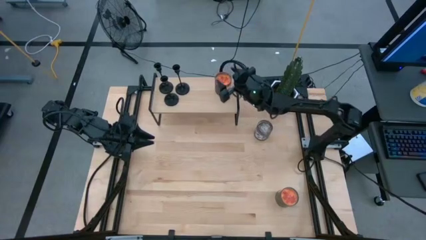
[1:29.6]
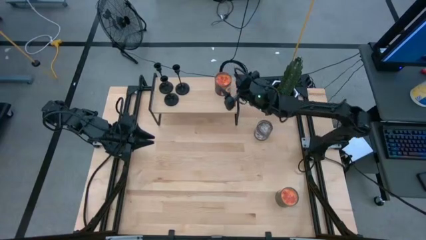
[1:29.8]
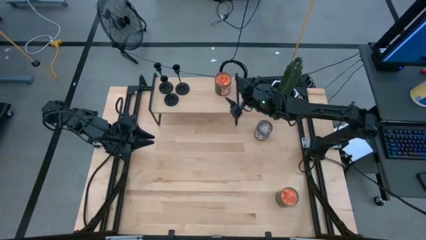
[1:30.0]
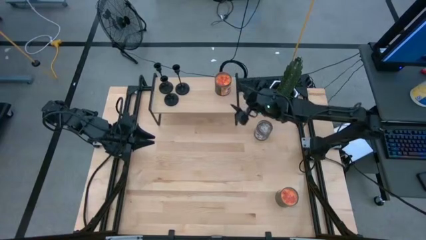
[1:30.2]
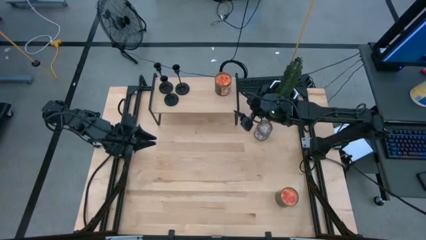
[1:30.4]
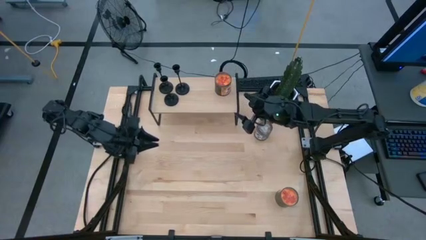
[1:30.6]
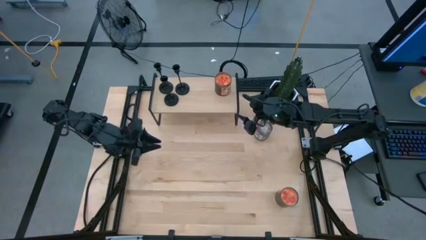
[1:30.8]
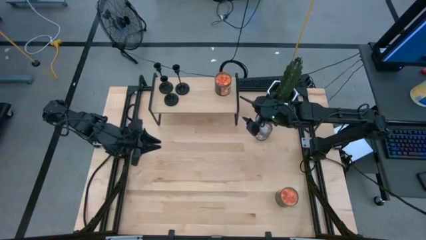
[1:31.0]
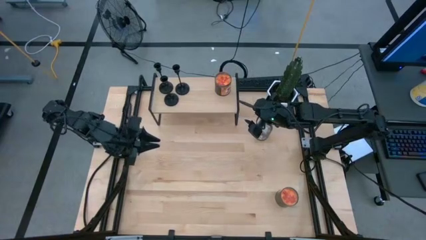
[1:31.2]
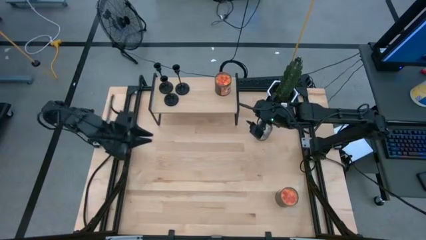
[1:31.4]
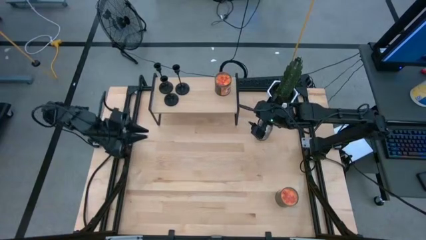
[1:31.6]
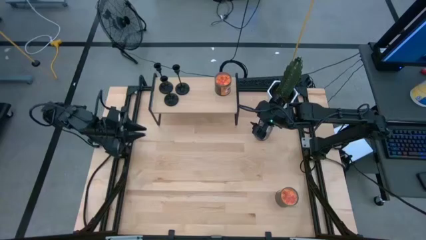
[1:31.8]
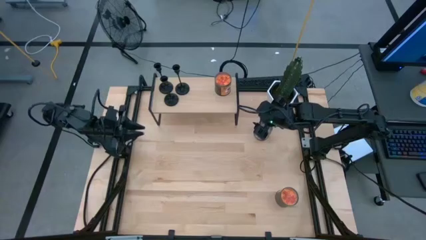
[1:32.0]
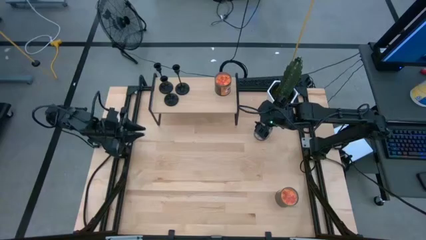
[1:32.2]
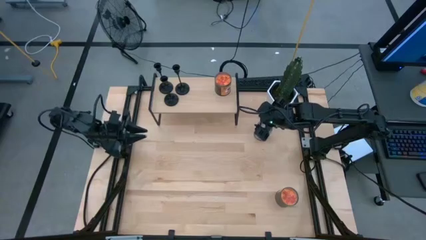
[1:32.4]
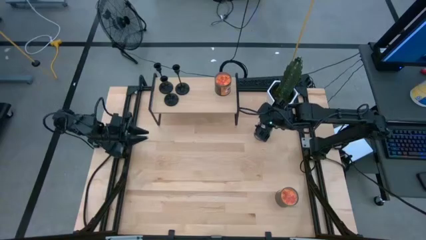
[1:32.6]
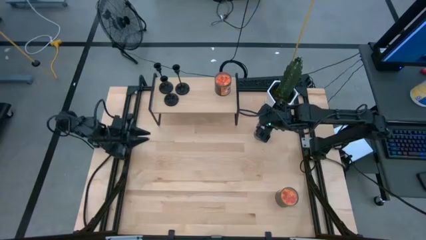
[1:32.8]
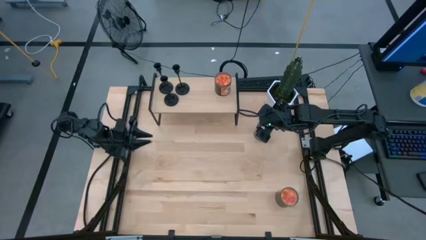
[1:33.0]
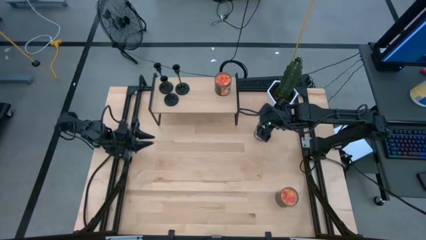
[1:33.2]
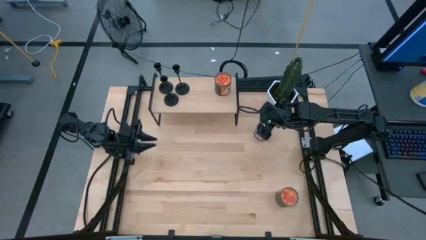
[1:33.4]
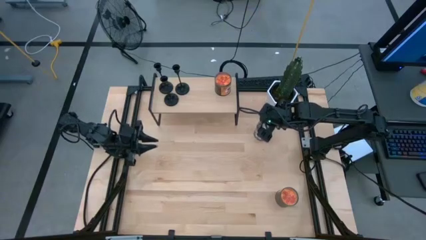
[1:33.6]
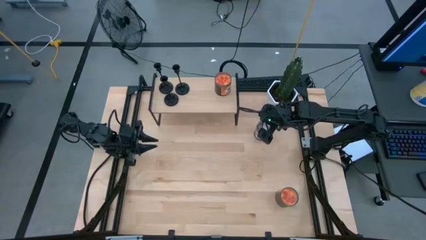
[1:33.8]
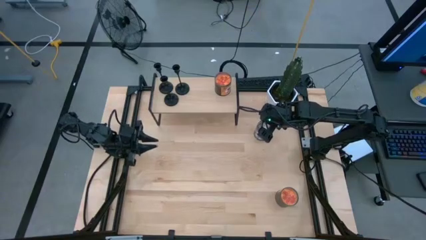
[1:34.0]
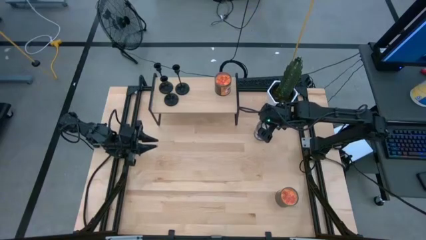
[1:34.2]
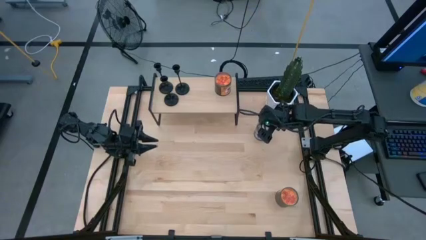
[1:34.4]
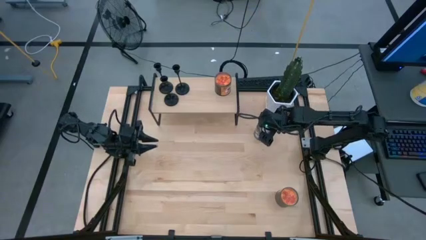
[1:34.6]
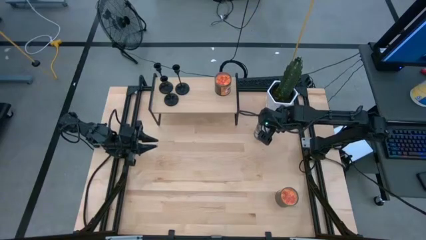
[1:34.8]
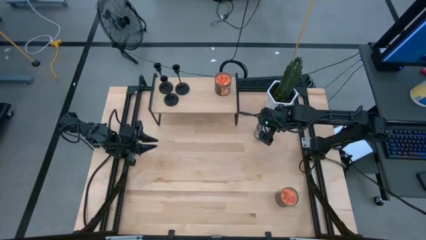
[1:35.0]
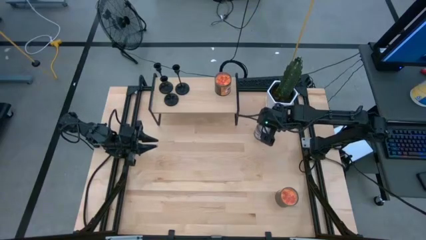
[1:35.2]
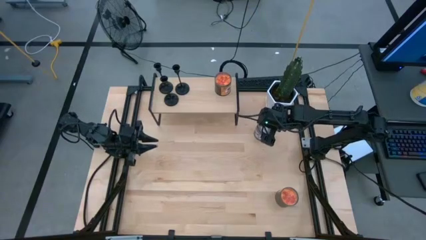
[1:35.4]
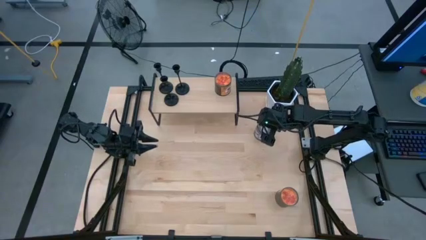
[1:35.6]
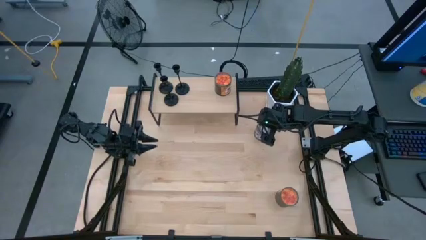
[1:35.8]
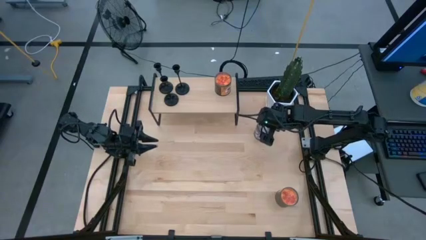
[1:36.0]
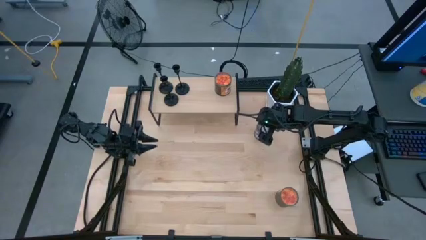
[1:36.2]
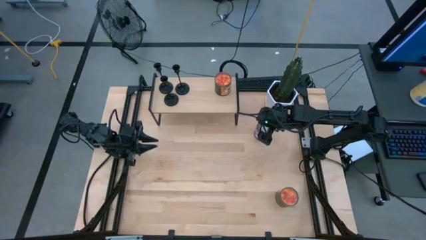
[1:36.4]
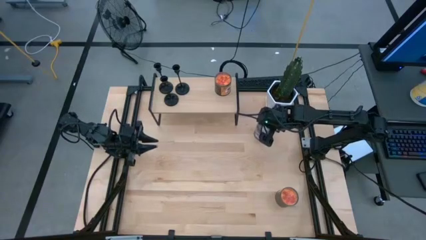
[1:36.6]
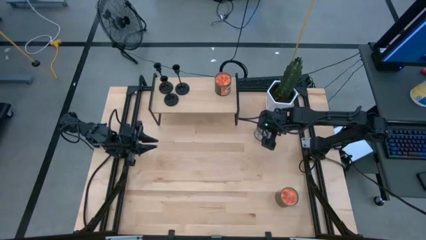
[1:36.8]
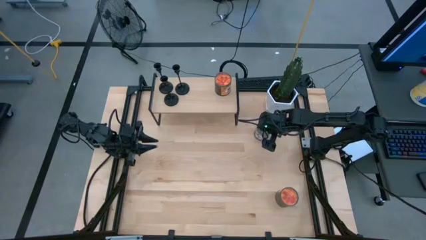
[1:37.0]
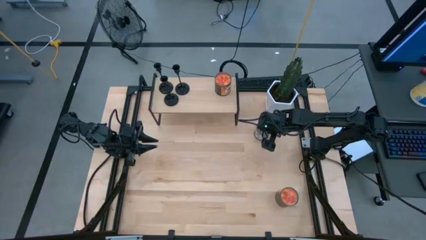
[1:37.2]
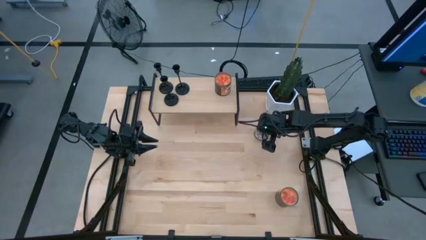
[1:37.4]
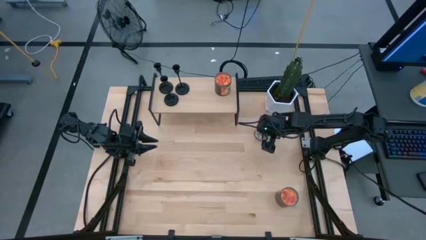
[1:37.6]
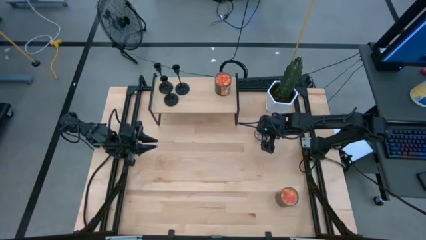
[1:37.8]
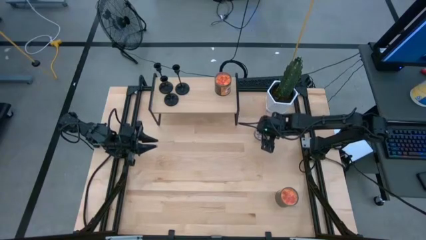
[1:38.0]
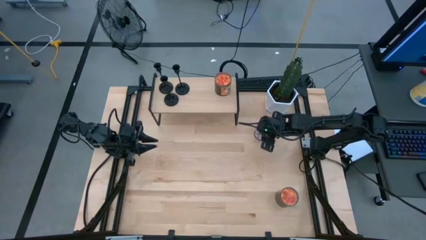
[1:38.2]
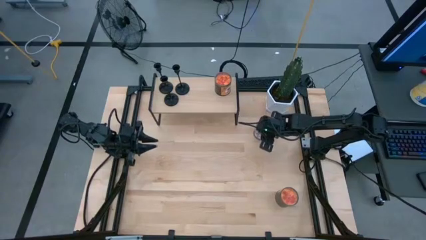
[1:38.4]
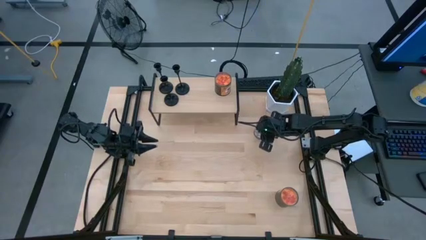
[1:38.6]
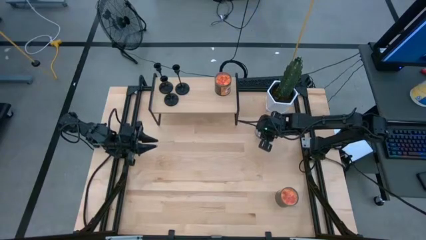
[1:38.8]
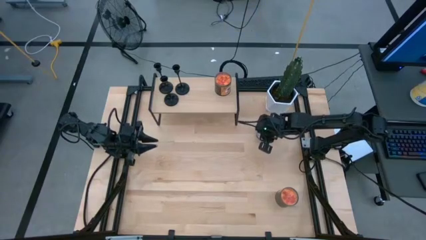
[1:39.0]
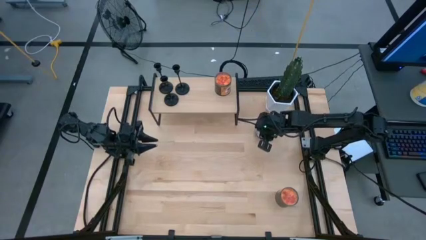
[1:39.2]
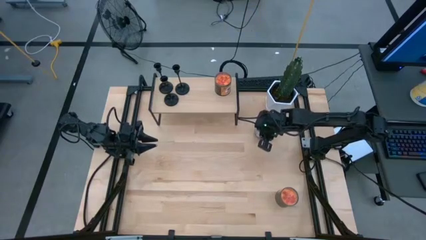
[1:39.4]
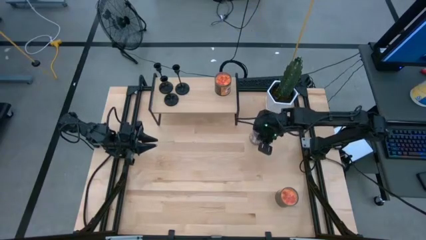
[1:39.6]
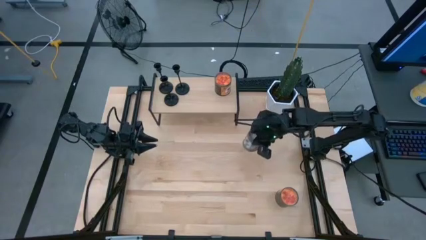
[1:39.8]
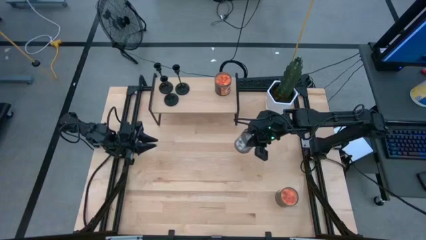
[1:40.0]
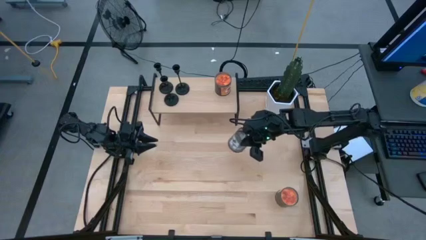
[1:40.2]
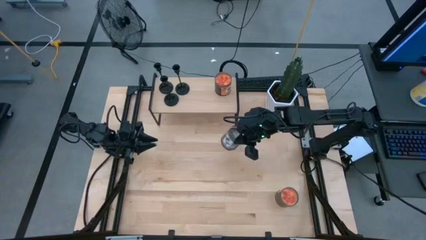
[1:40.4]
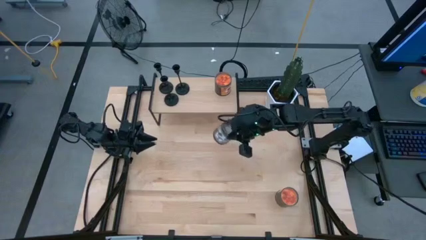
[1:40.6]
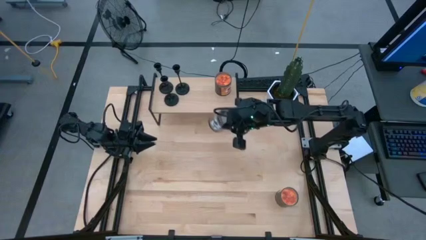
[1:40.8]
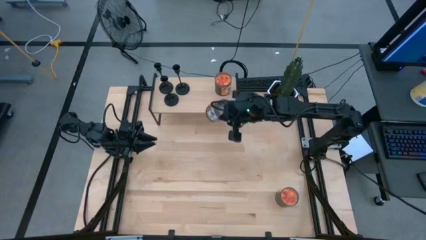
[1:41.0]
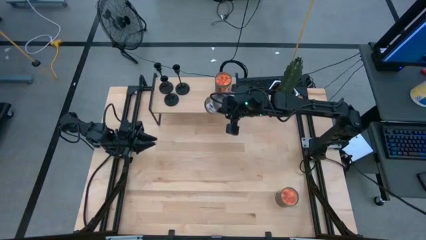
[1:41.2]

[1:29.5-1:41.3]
Task: Pick & Place candle stick holders
Put the brown scented candle on the shelf

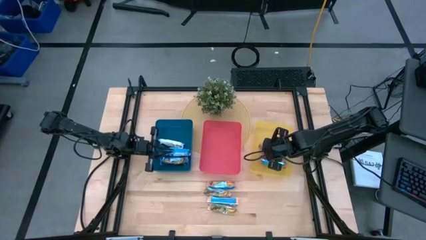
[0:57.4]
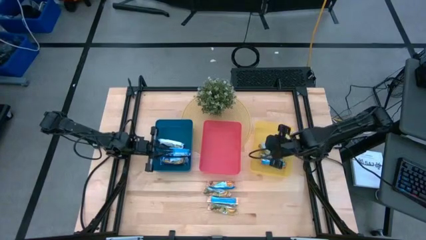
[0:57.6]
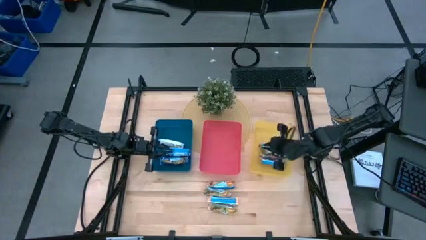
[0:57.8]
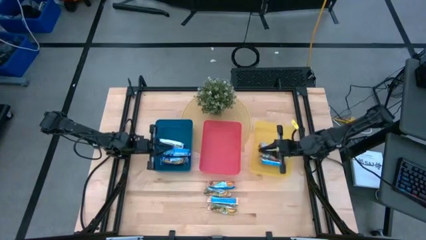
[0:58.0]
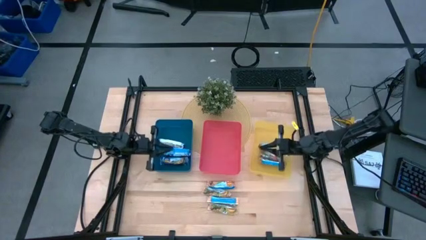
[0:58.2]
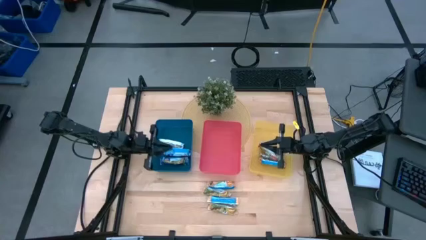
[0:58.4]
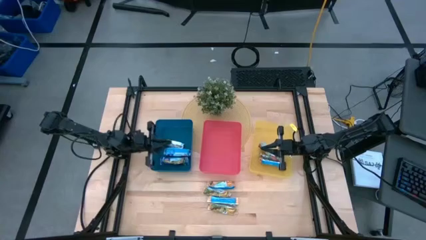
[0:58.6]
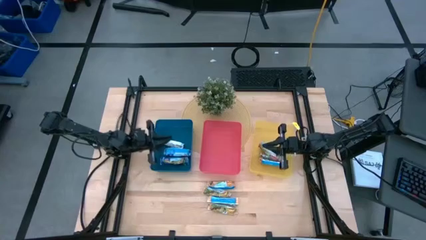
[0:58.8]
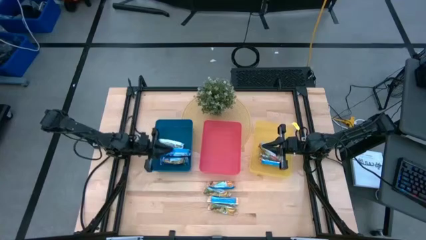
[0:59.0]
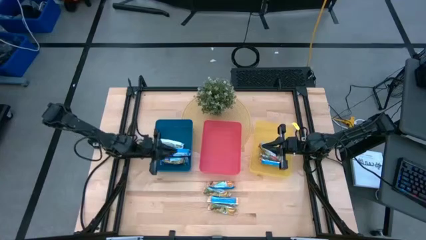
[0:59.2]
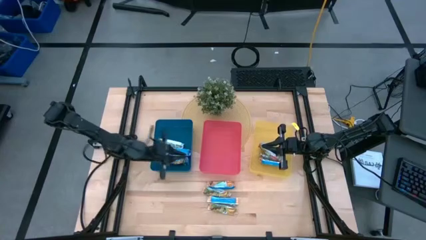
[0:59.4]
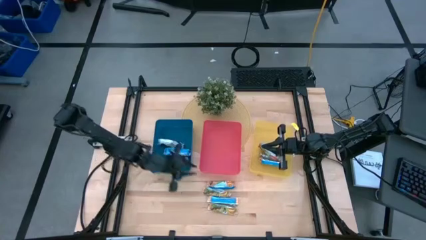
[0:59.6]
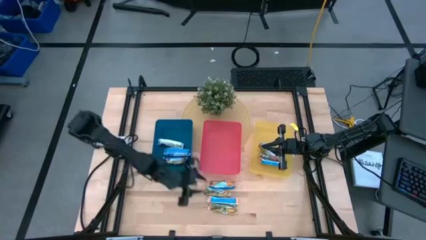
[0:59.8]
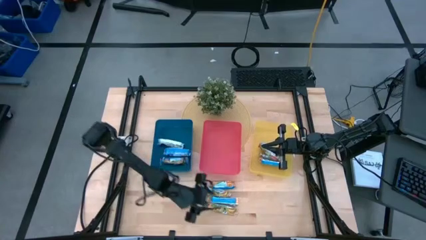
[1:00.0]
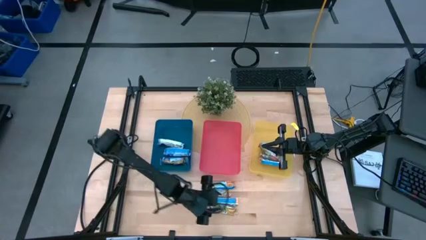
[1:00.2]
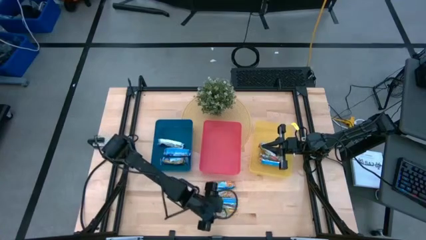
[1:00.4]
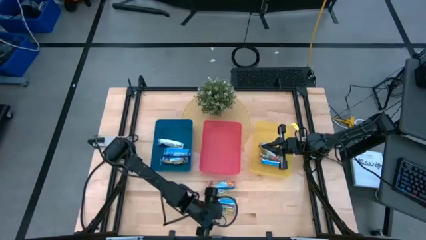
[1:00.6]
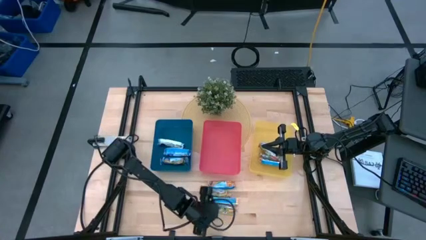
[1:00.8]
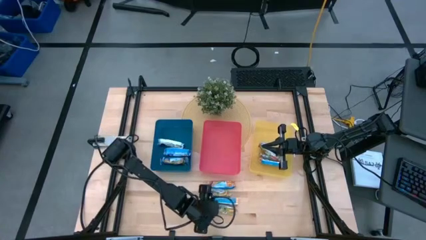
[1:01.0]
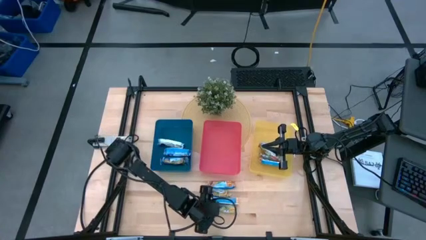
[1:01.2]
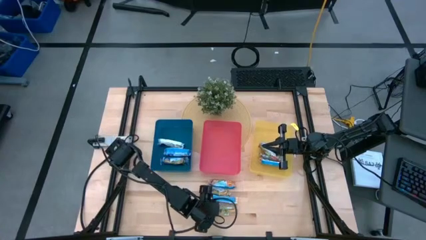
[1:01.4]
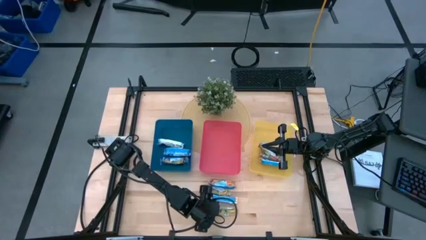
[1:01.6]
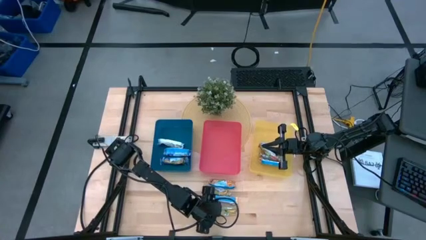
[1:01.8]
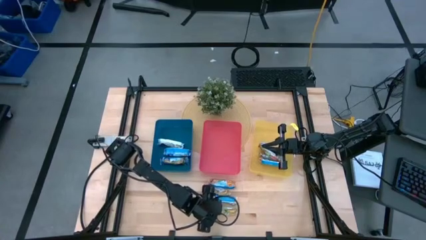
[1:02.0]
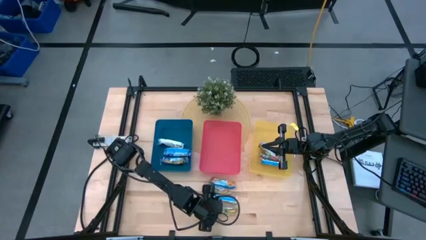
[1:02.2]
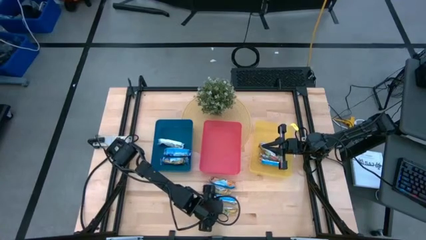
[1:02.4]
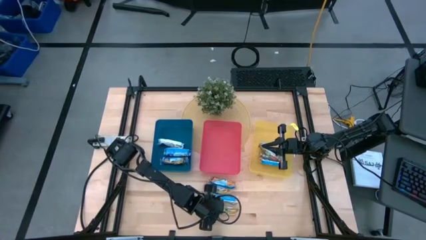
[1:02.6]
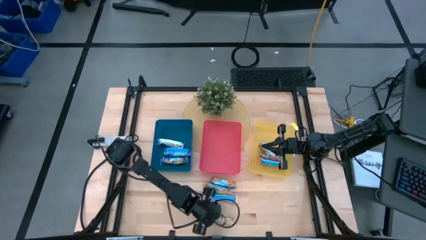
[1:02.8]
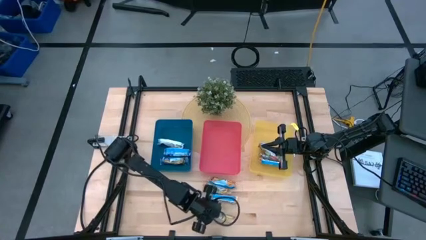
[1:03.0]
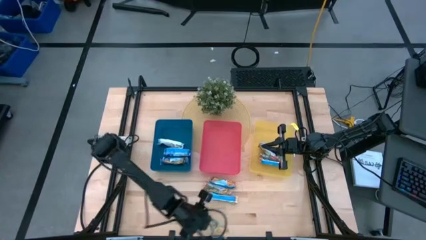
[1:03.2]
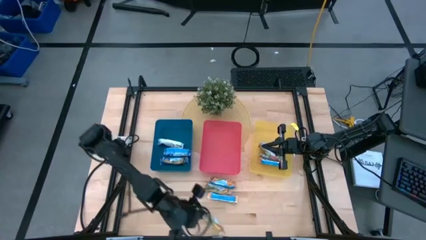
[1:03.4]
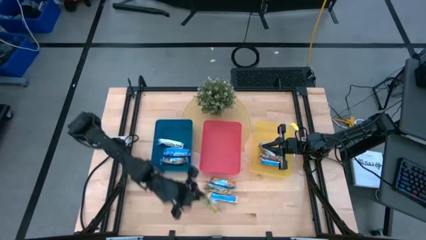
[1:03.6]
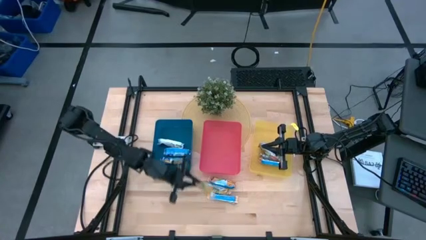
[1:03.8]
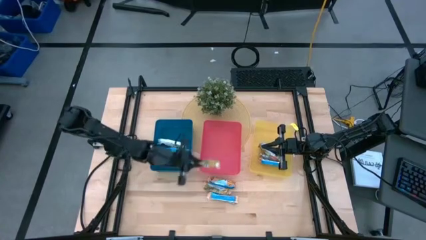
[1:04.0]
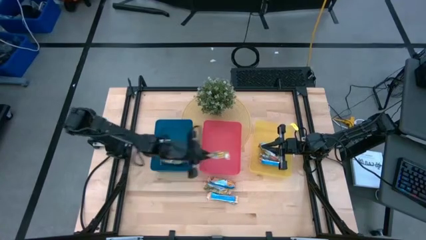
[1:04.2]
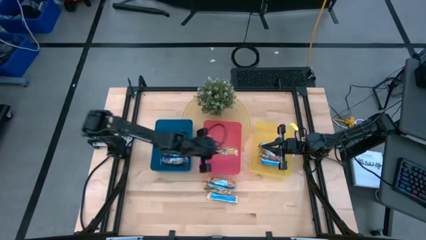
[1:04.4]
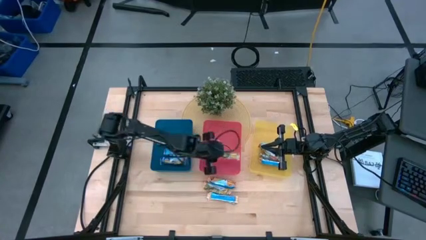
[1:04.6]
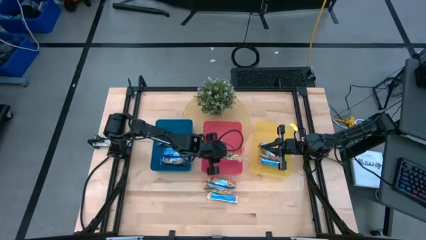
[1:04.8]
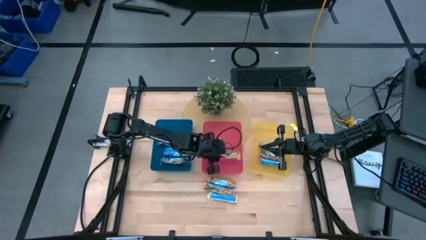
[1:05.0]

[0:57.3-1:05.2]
Task: Pick and place Granola Bars by type
Put the yellow granola bar into the red bin
